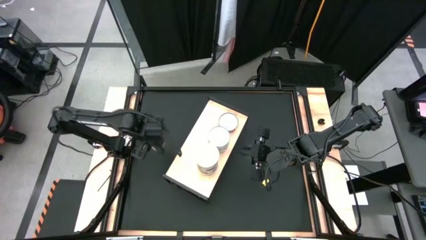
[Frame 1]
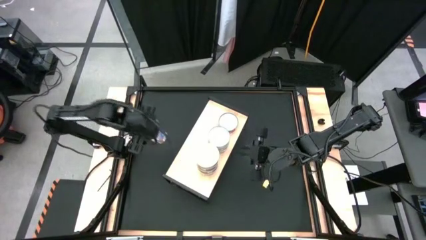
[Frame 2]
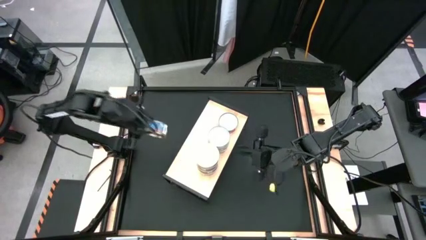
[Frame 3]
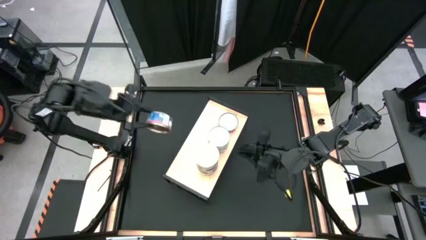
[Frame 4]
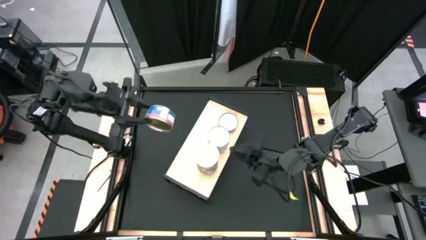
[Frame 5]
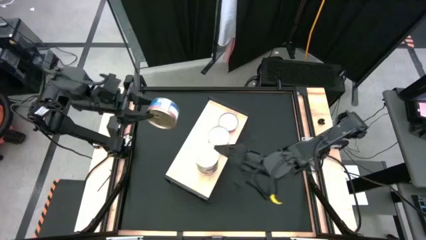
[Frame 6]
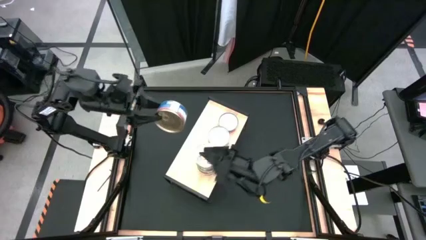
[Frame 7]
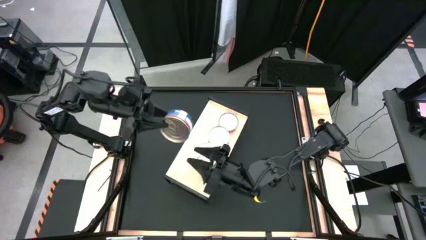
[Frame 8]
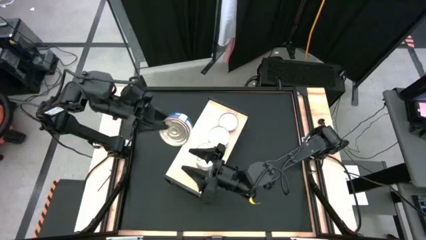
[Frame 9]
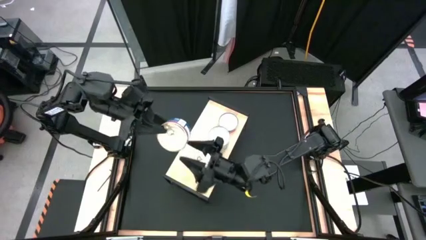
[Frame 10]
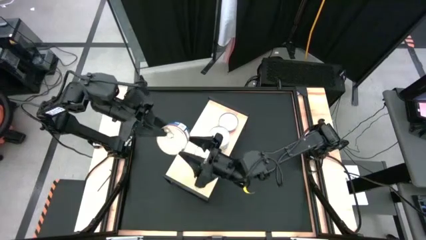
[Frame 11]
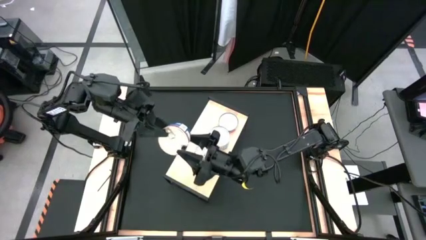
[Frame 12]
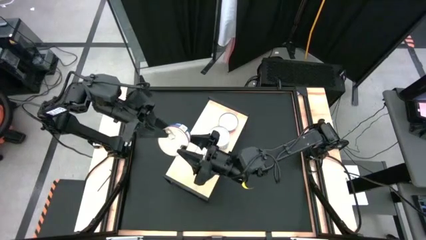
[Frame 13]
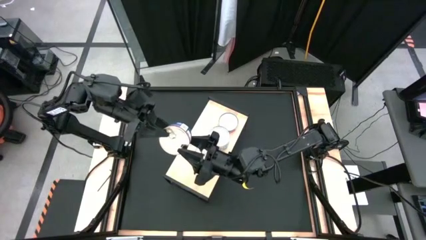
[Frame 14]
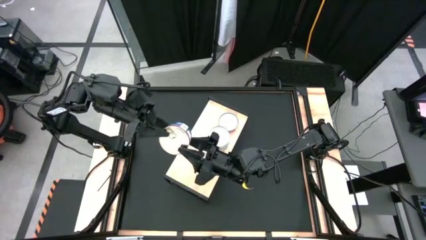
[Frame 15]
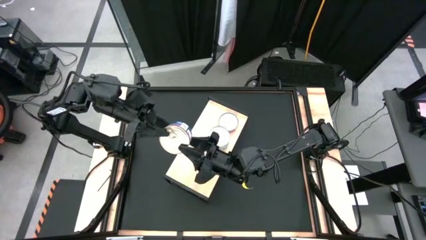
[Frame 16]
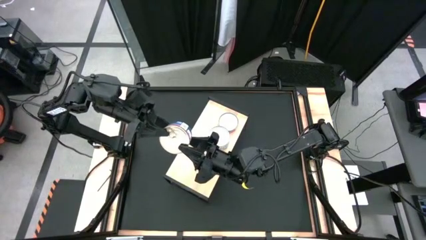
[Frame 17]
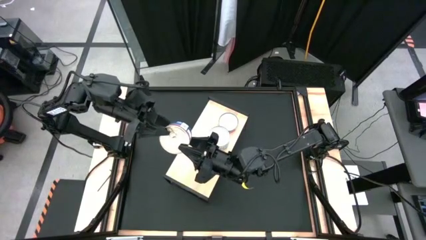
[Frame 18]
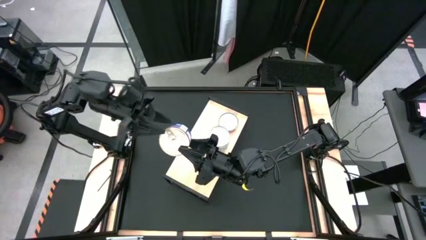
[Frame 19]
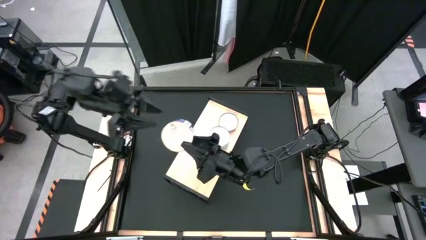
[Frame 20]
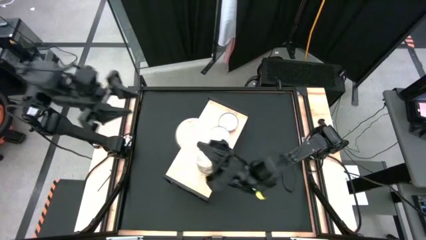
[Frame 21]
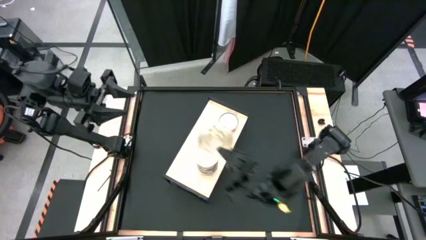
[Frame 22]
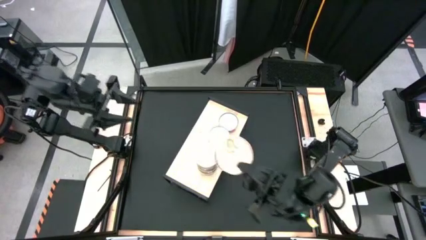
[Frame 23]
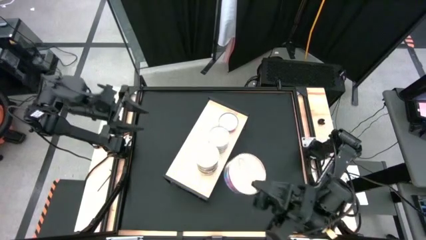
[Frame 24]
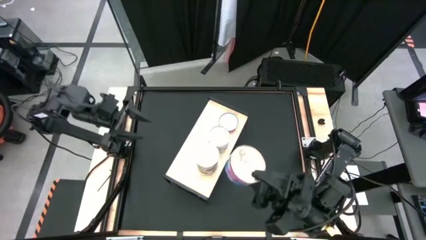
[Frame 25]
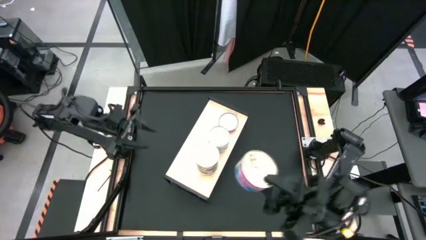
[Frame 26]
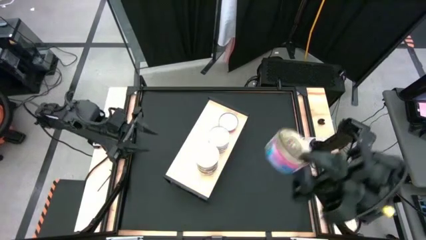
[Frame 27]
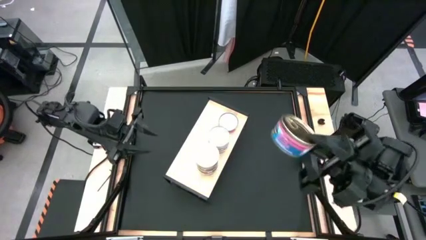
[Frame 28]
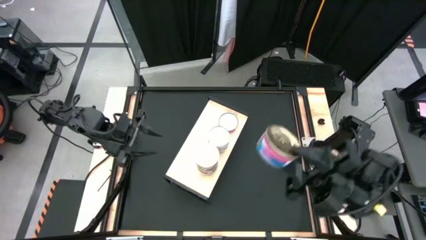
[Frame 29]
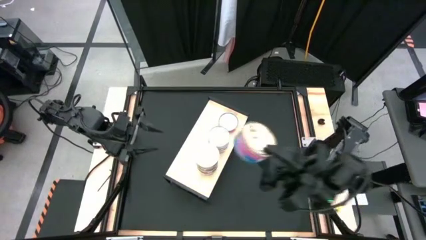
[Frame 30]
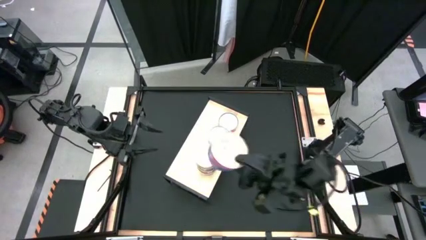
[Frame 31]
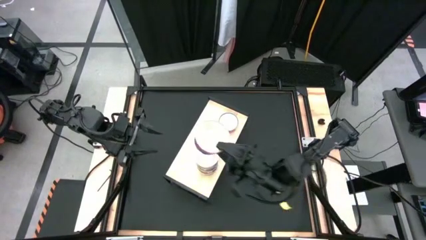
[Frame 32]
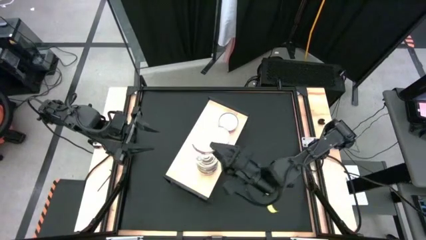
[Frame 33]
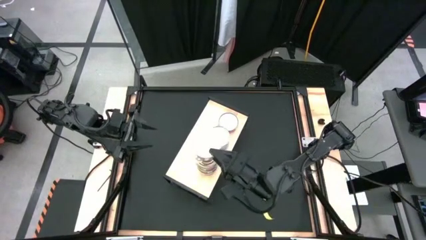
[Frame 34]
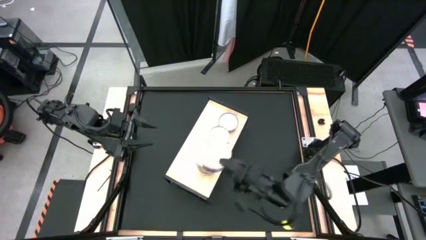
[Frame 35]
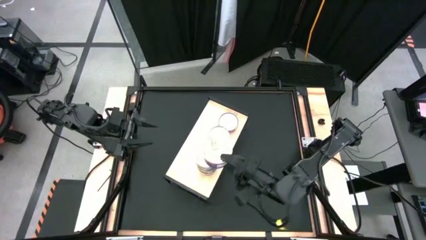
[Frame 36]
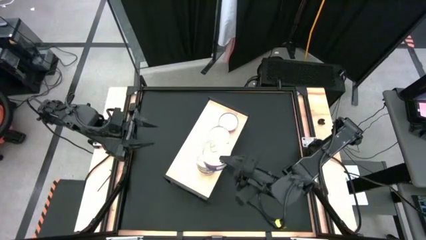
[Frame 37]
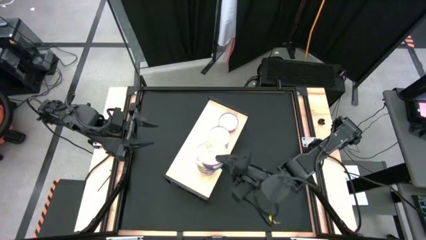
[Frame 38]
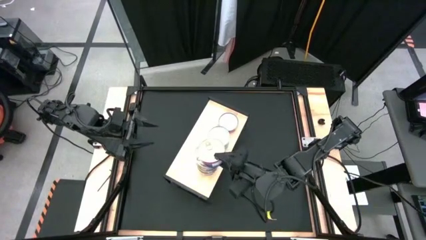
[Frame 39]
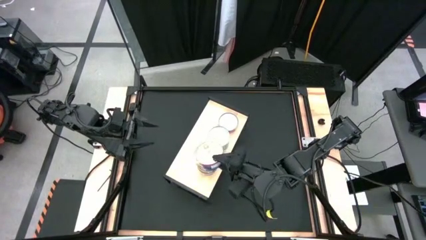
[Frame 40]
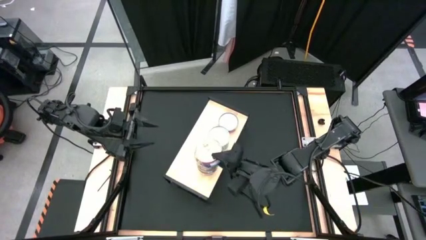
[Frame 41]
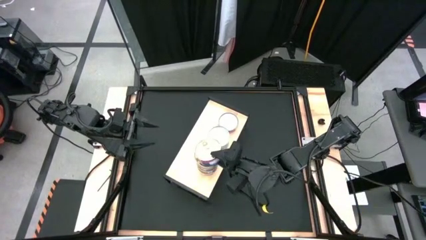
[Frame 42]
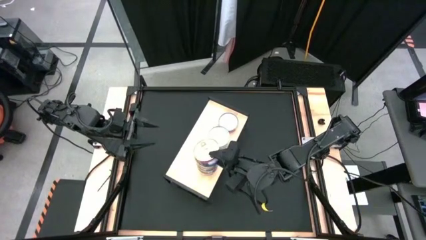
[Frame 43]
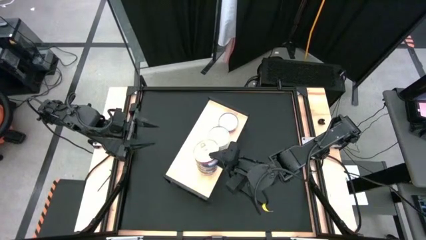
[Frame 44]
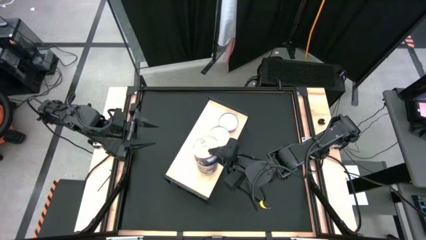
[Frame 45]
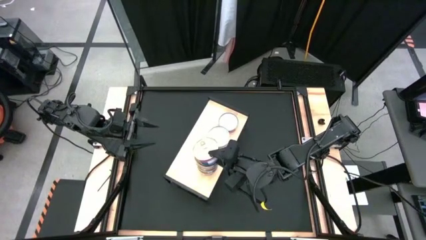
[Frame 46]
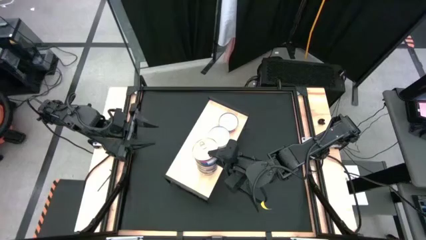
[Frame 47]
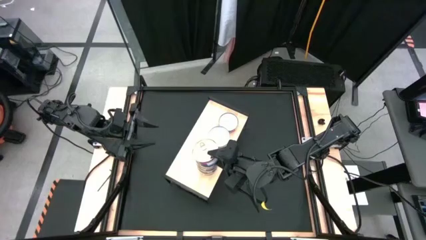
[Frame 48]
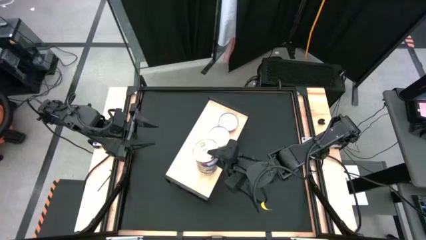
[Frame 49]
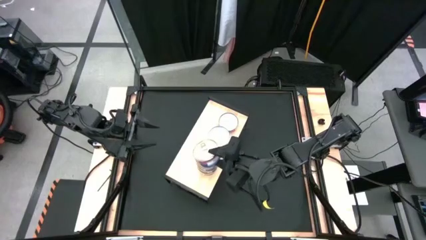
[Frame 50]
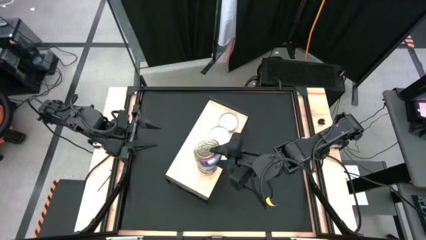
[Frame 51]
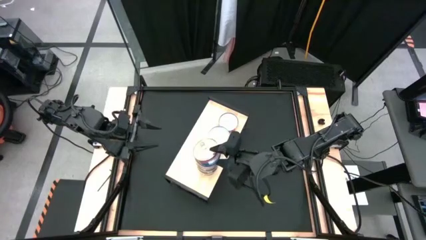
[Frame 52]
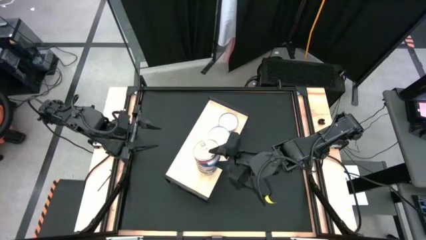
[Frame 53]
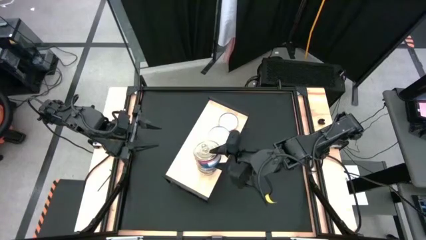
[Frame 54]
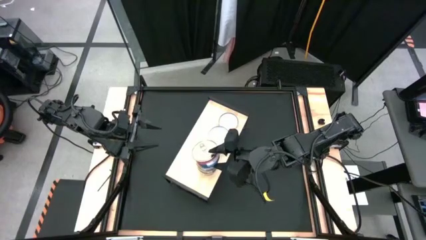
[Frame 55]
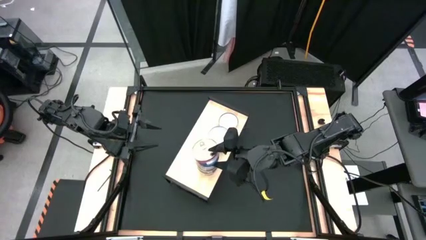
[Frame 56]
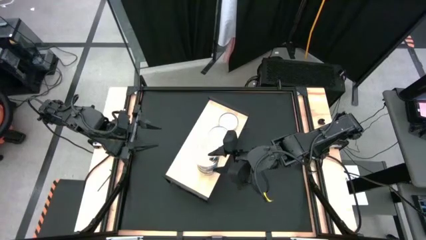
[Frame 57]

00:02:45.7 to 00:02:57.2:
Task: Stack canned seafood by type on shelf
Stack the blue tuna can on top of the other blue tuna cans on the shelf
